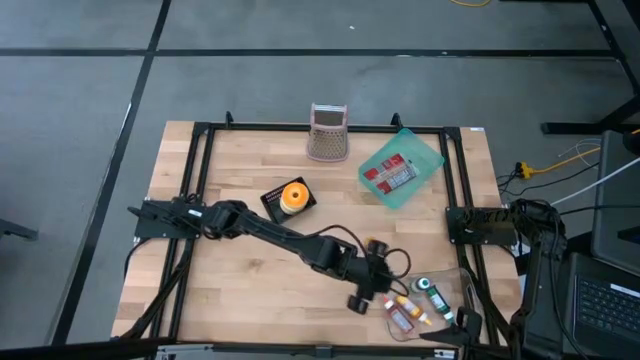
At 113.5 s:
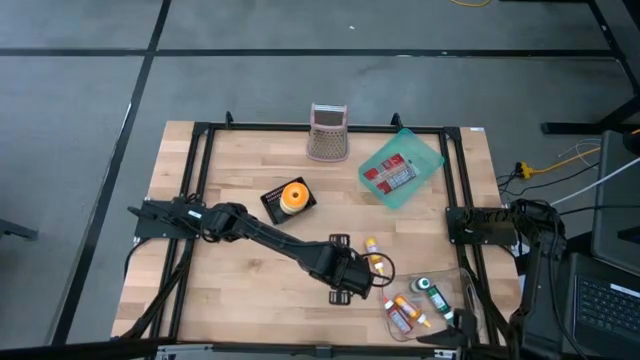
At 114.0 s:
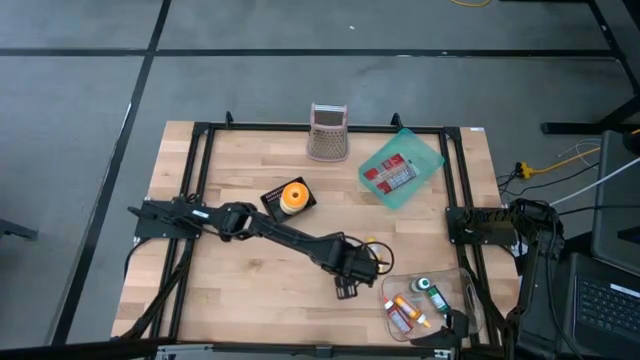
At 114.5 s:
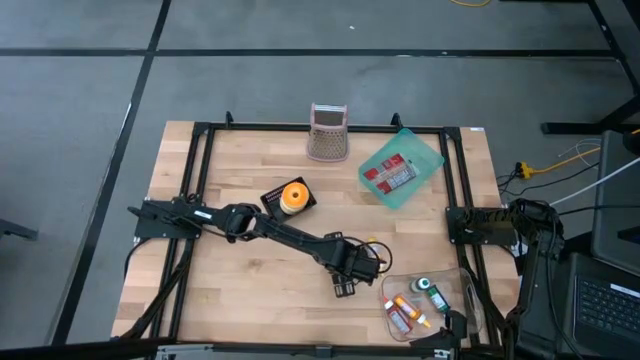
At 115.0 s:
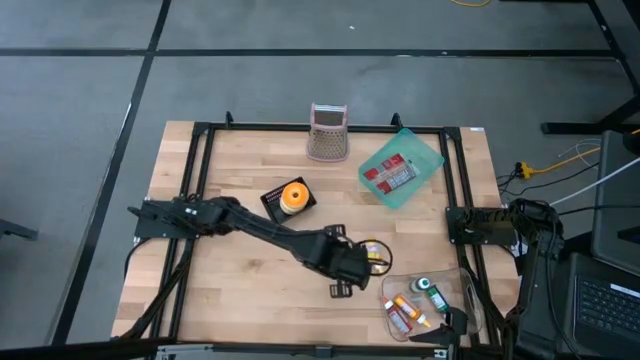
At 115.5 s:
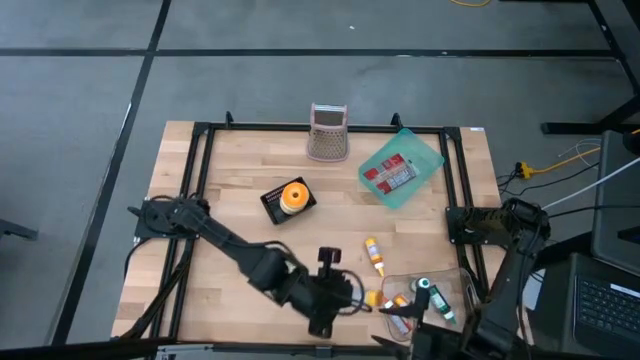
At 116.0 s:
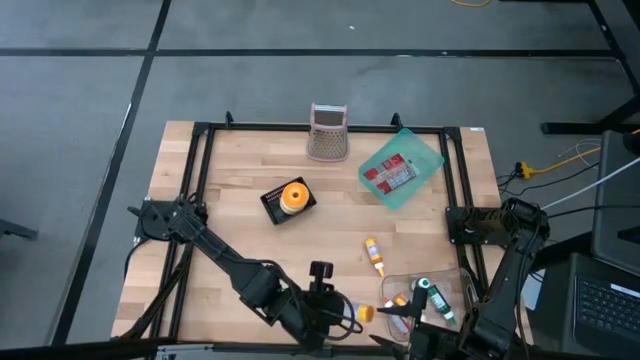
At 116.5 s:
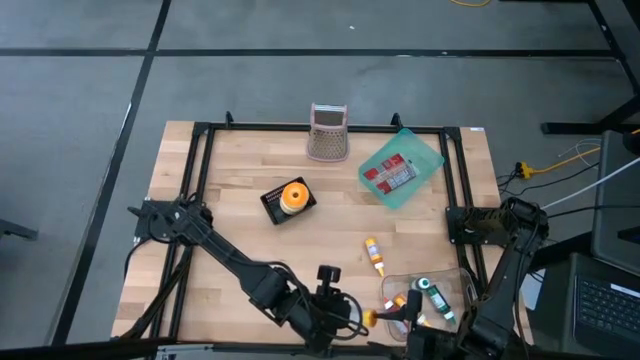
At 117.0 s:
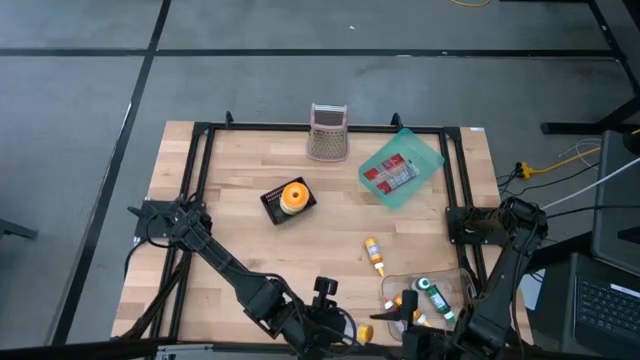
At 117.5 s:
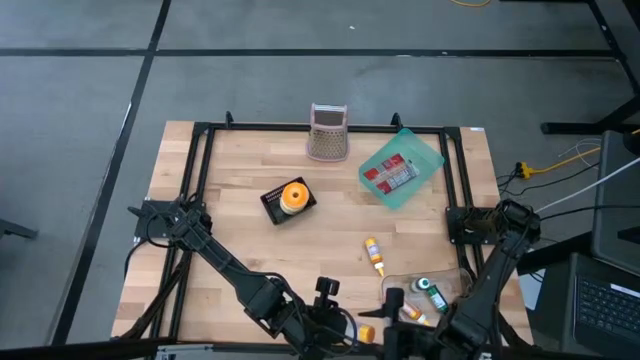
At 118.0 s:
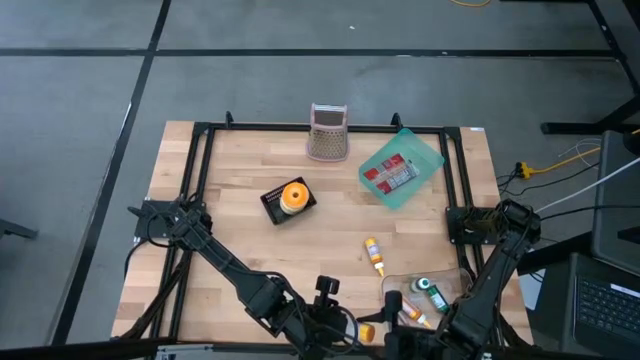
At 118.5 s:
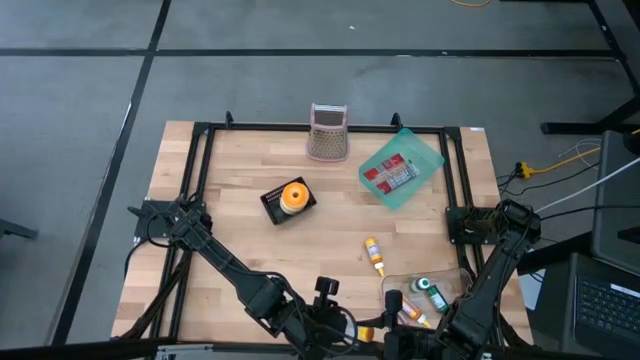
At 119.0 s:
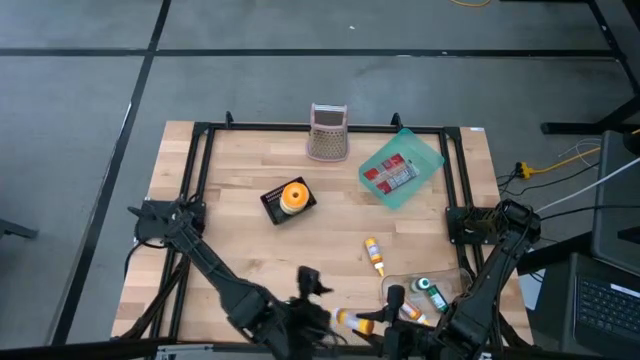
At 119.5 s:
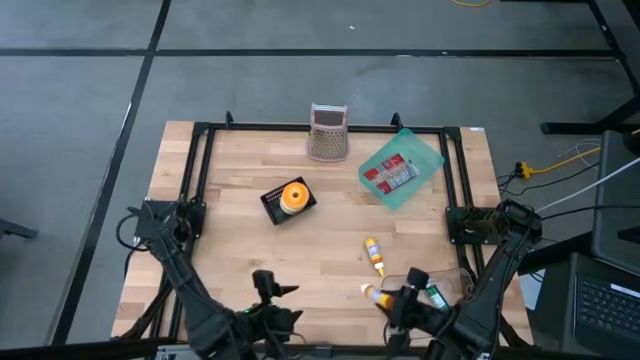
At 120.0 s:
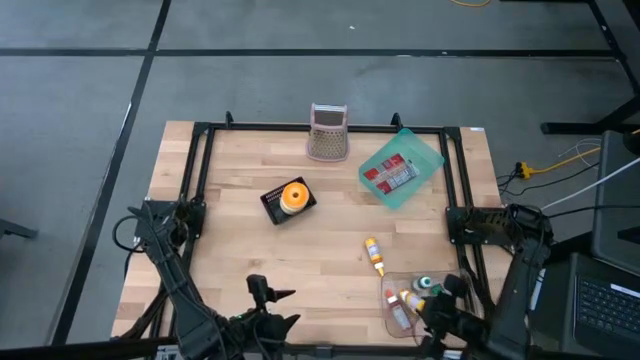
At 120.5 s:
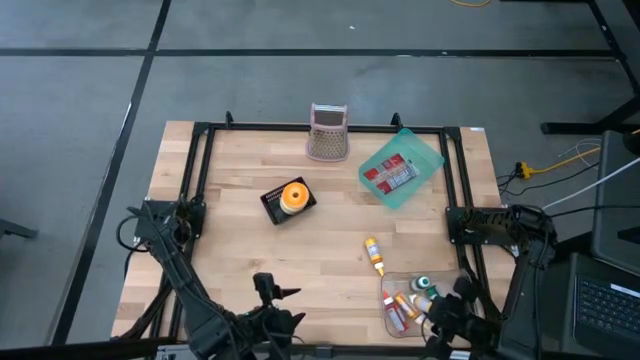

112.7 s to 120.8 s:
Task: Pick & Place Food Item
Put the left yellow food coloring bottle into the transparent bin

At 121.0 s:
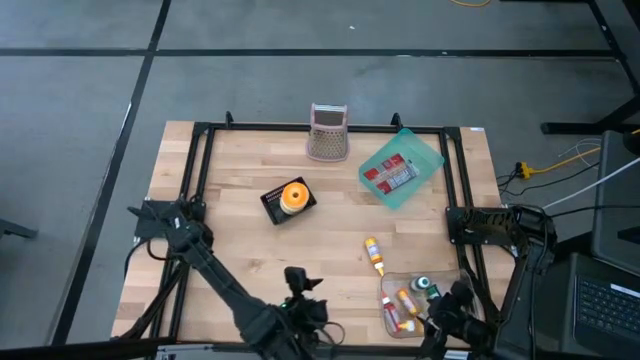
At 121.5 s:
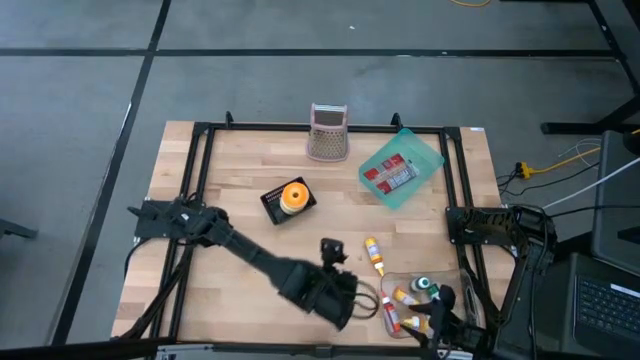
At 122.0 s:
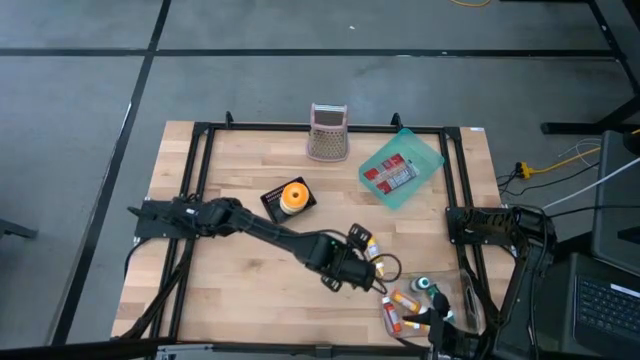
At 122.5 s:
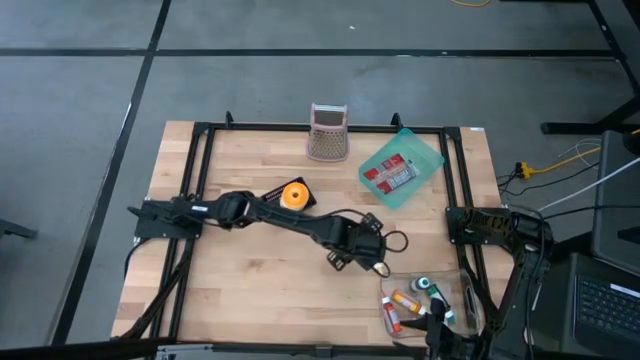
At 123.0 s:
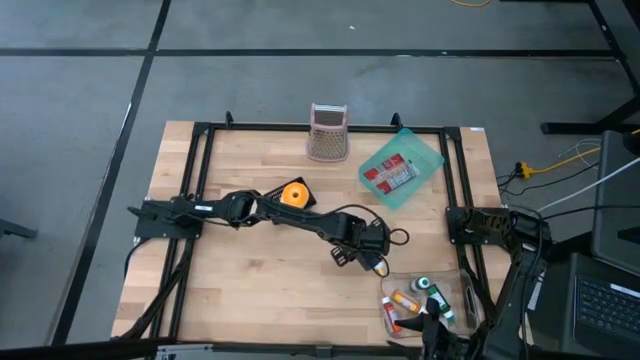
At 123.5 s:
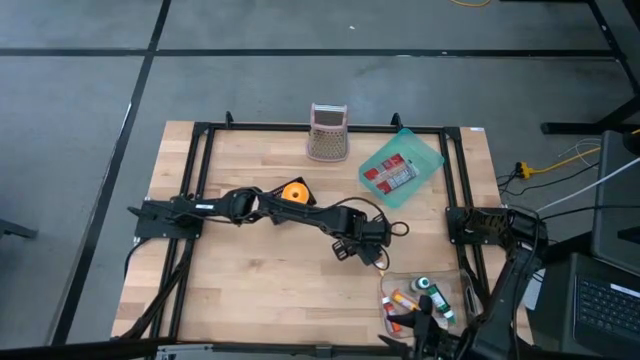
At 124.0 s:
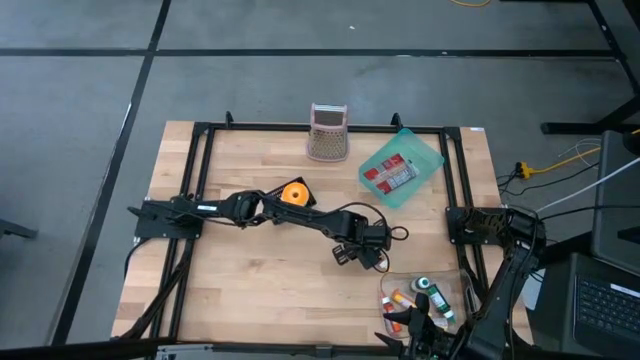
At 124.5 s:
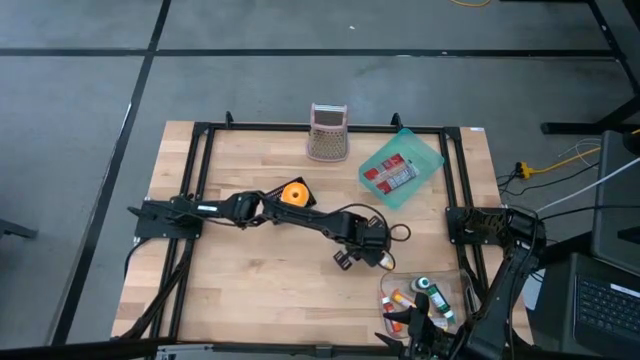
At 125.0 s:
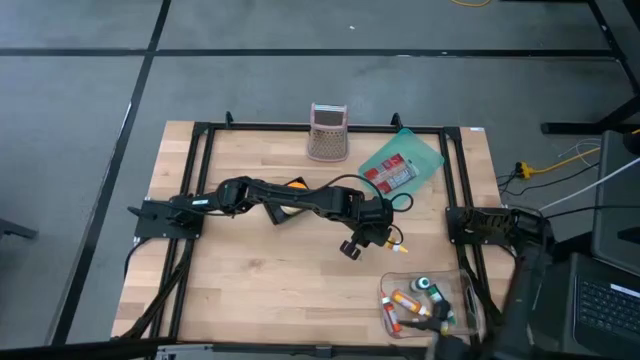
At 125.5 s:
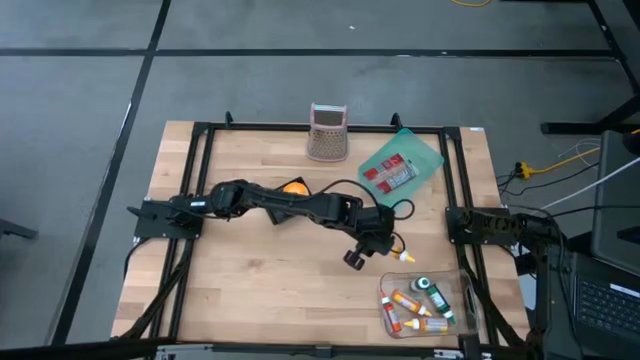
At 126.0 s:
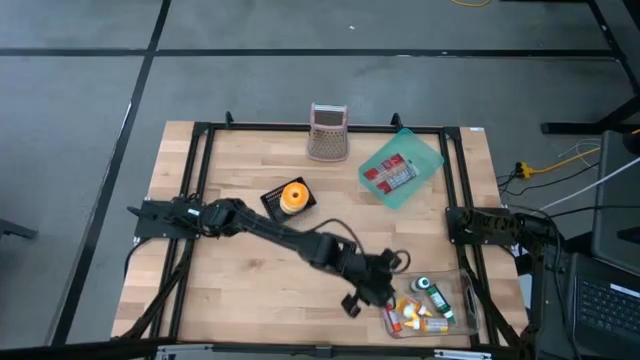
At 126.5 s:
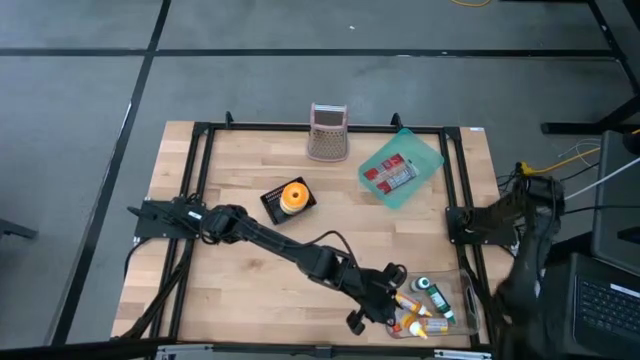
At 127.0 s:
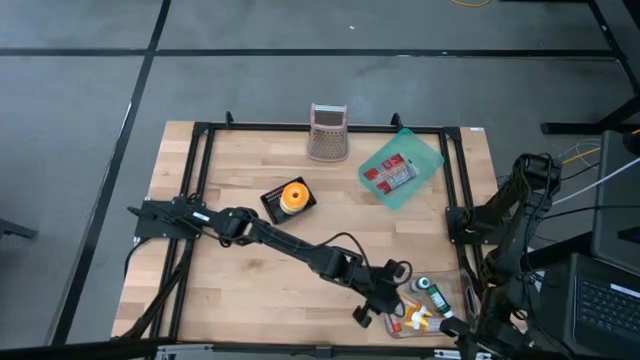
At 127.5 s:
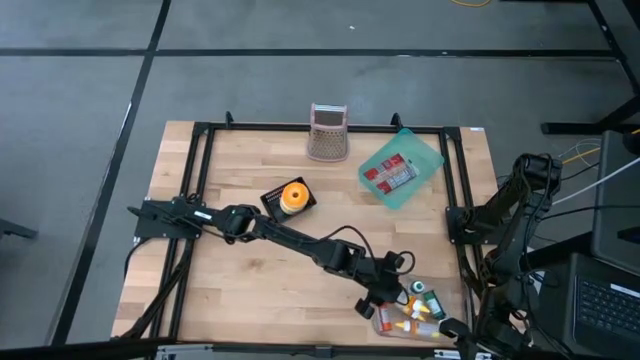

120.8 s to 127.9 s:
Put the yellow food coloring bottle into the transparent bin
